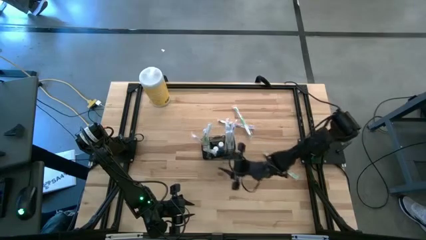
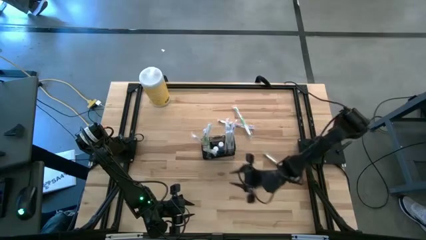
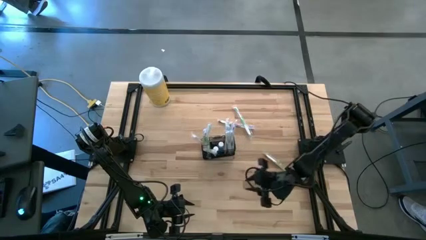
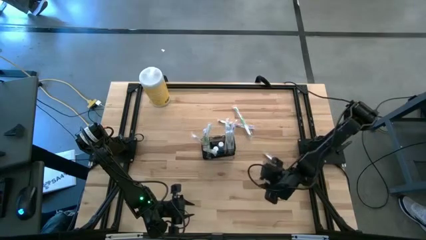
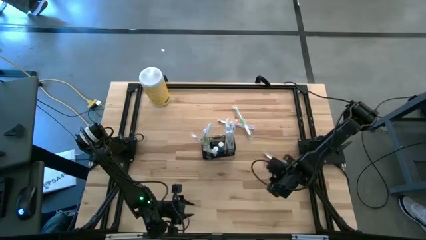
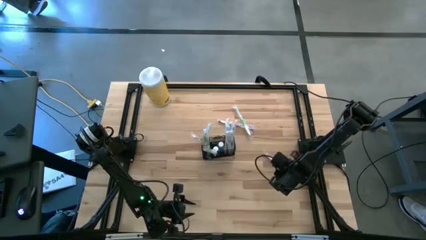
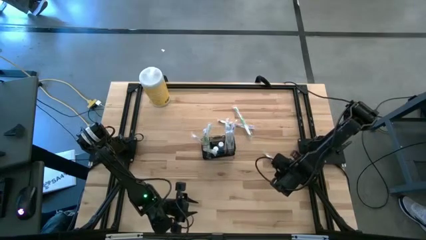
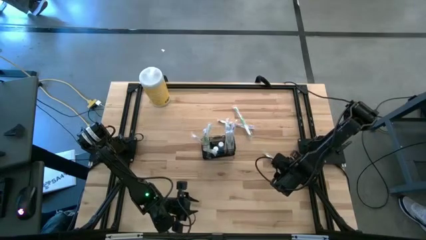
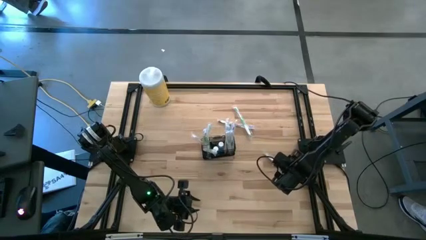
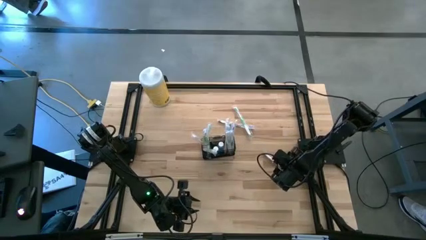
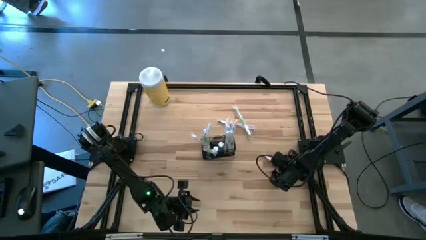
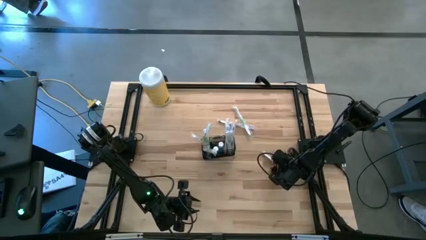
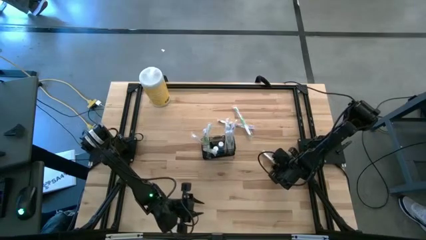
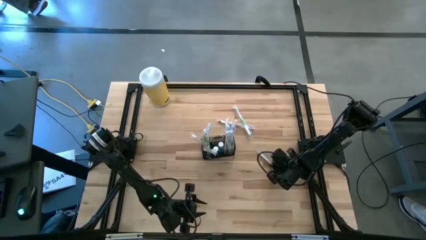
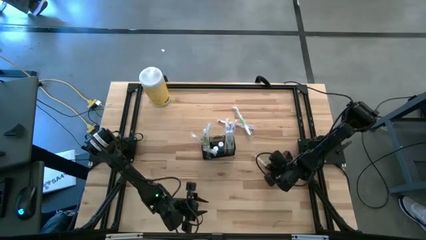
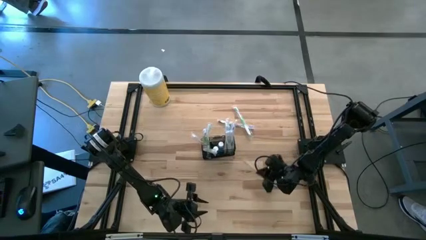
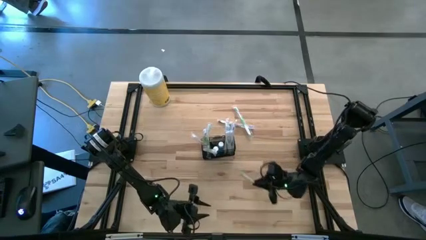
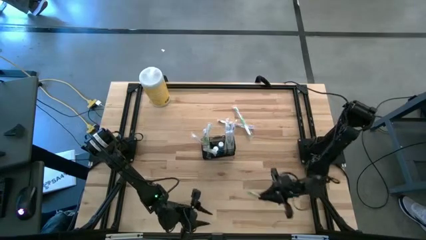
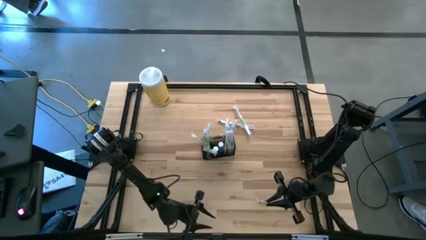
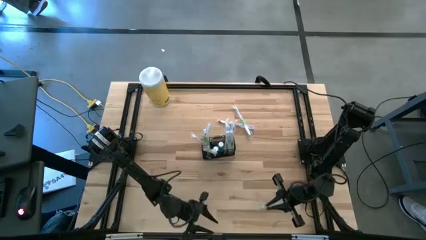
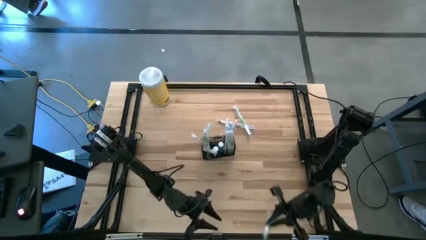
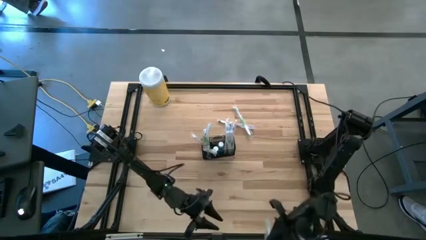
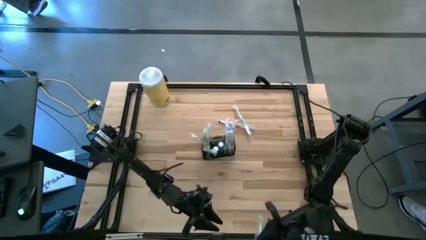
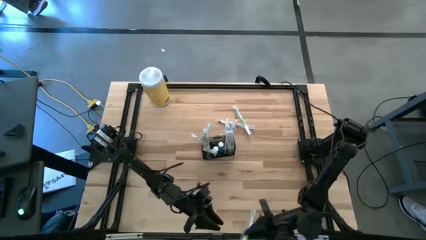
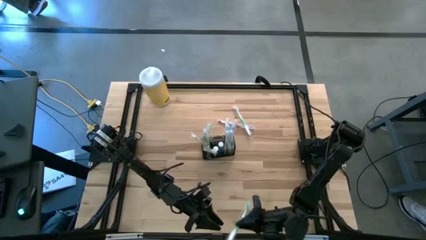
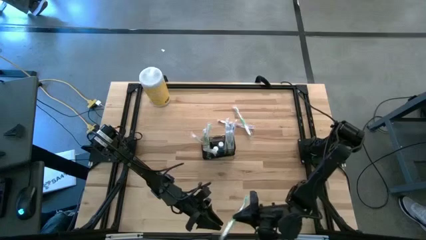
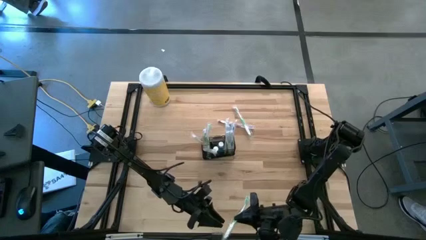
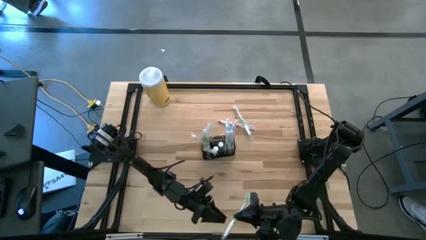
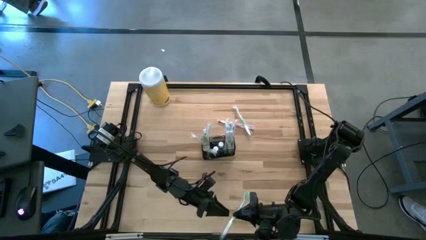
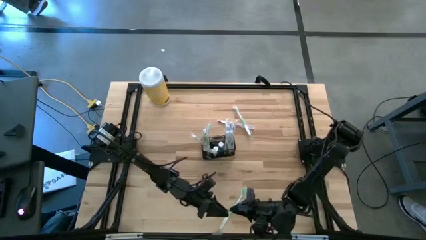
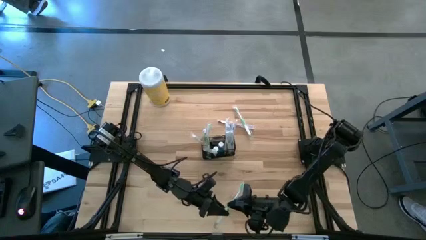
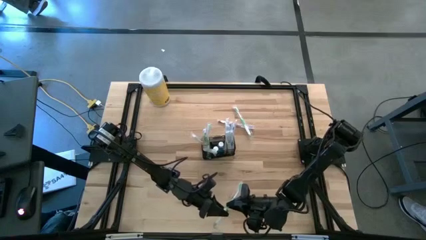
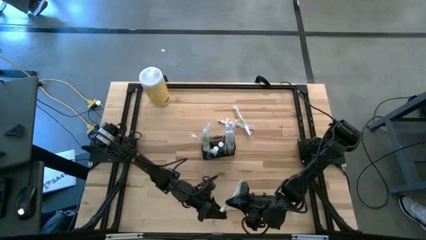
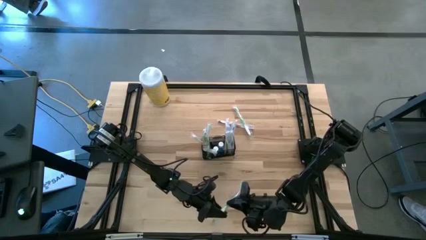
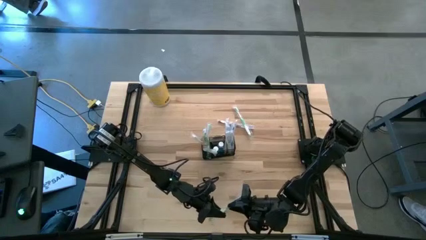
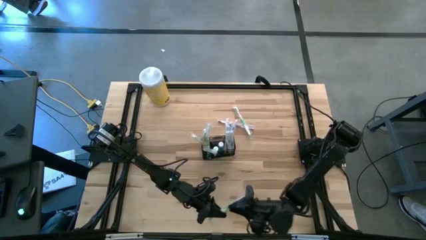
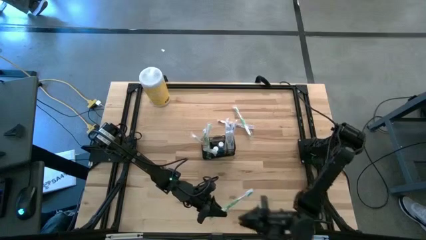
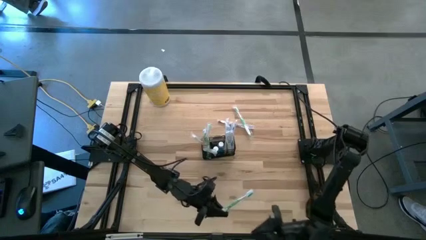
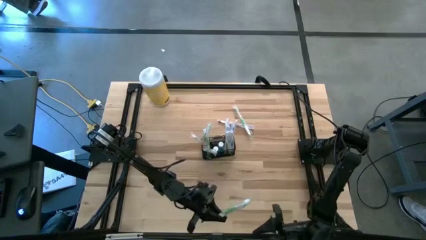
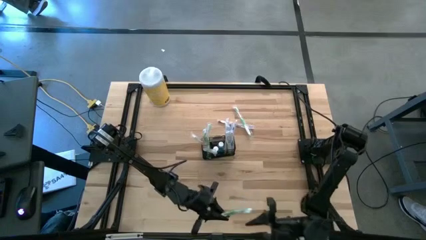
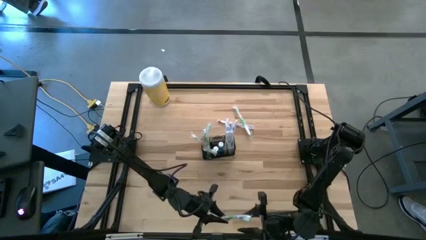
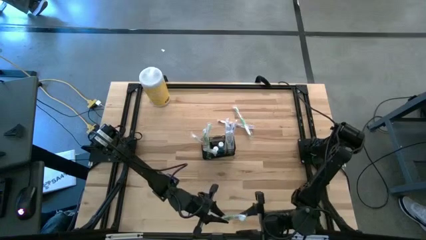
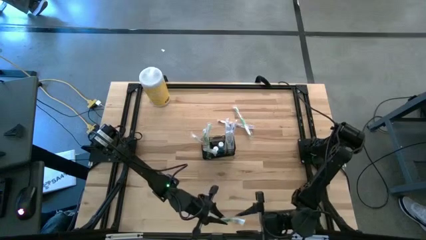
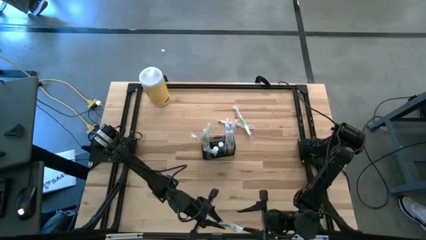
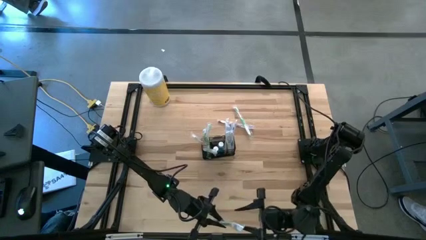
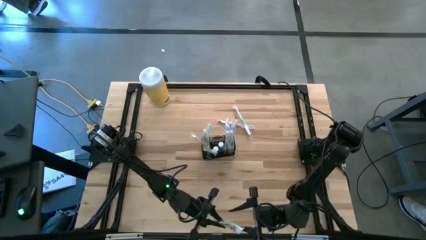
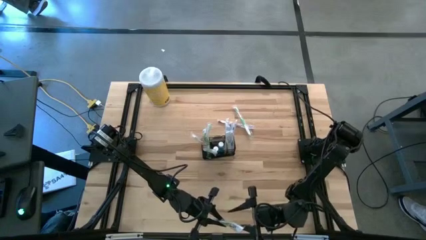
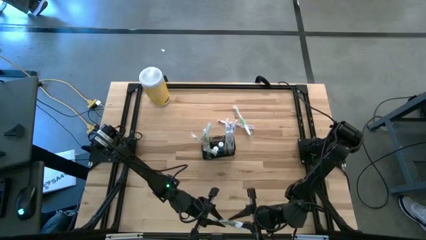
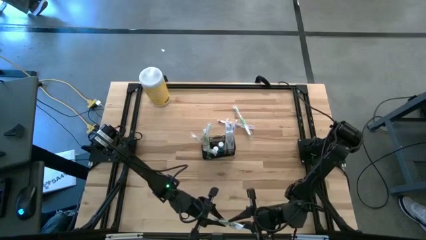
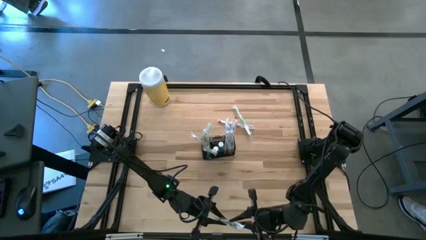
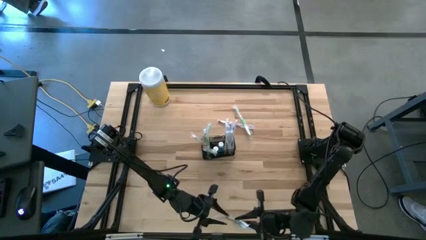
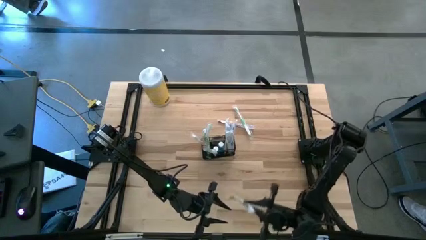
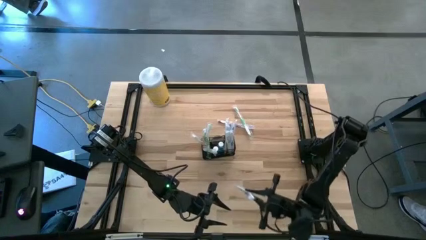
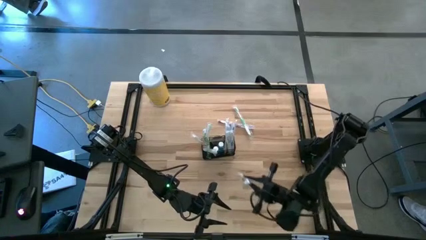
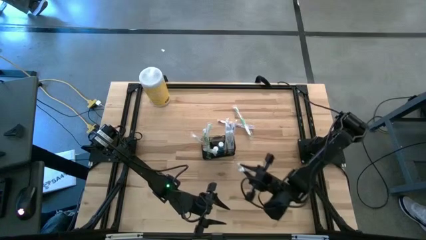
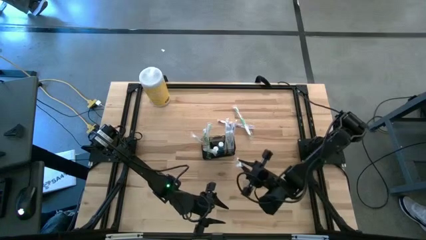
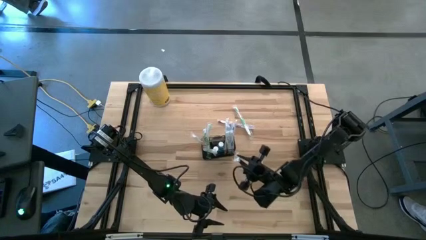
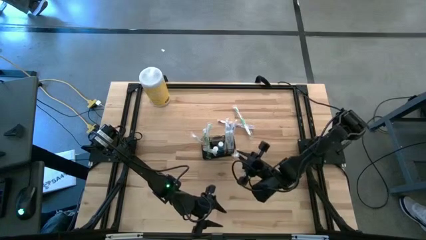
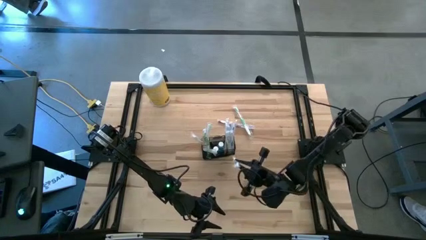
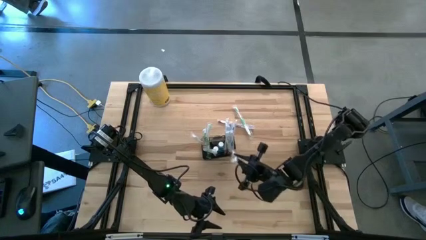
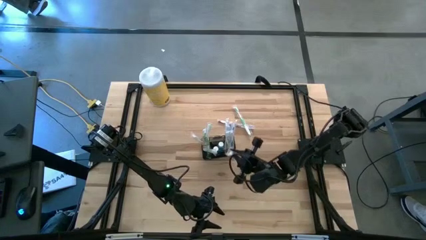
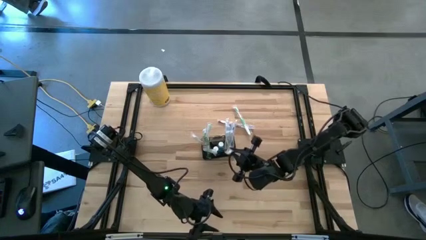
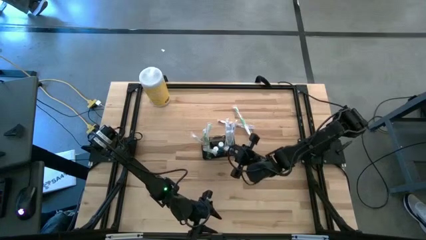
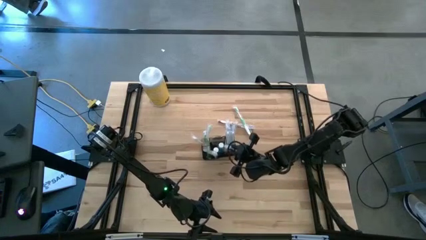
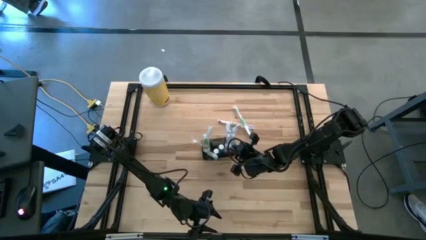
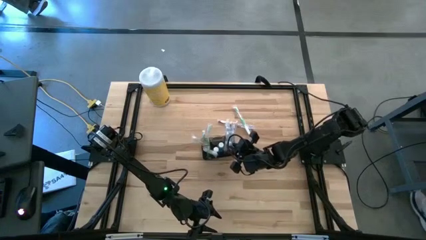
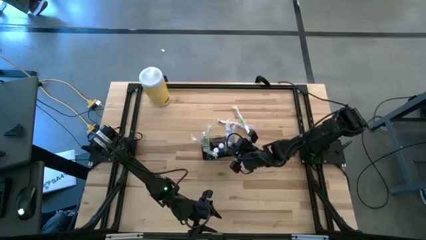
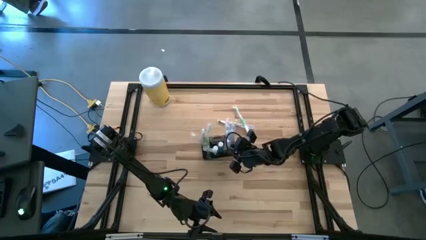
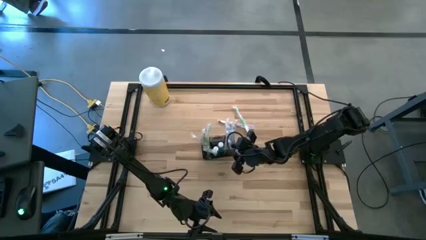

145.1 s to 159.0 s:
Task: Pick & Place toothbrushing station
Put the green toothbrush into the wire organizer

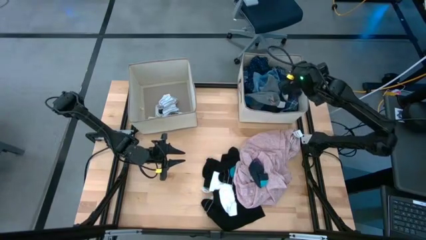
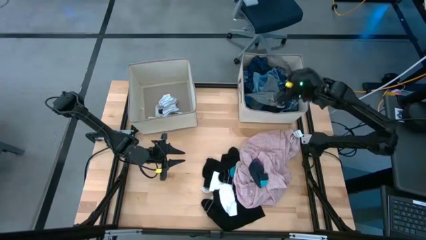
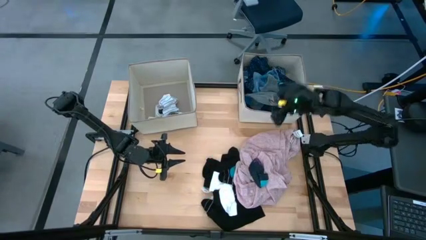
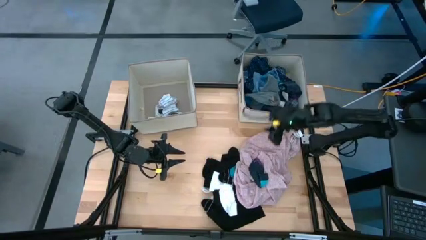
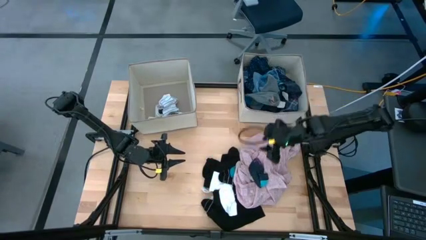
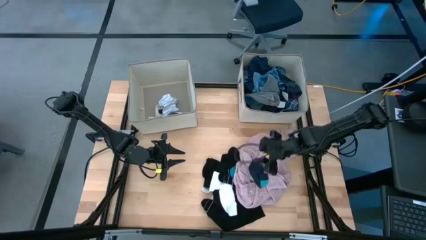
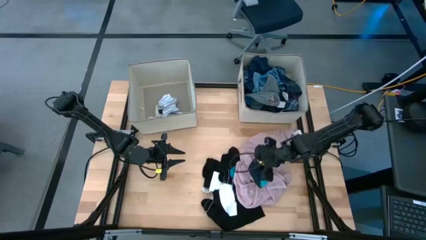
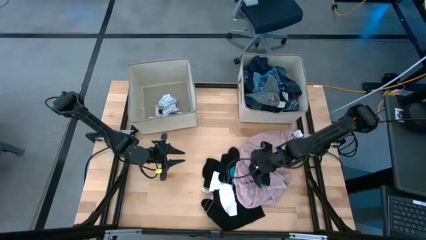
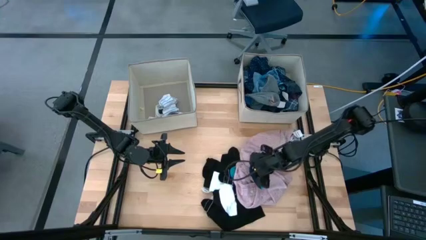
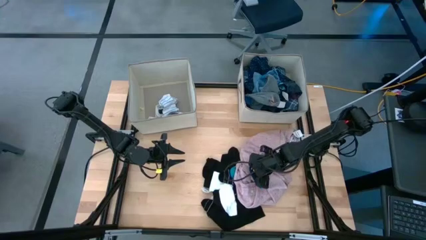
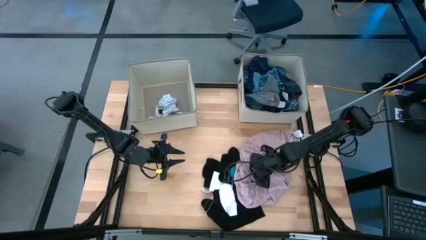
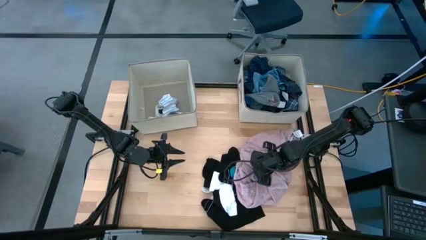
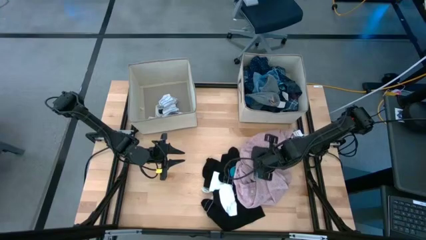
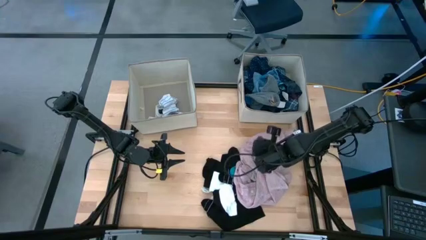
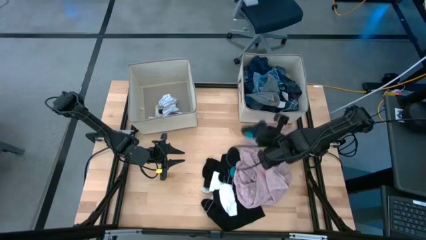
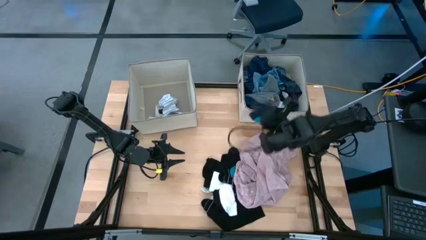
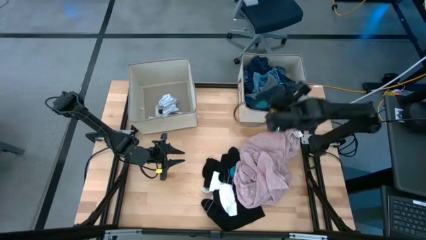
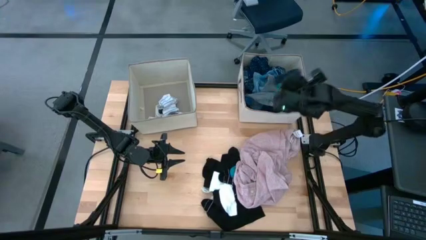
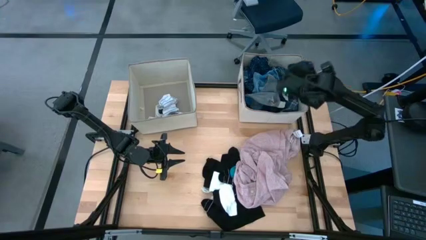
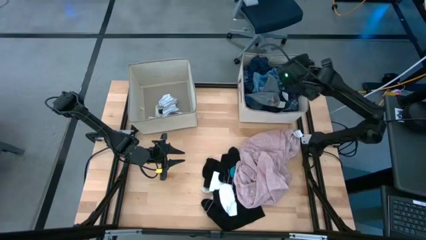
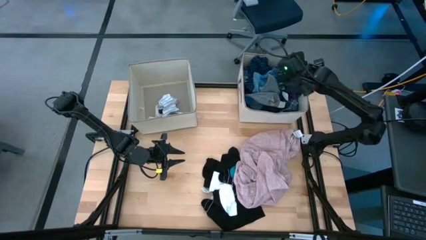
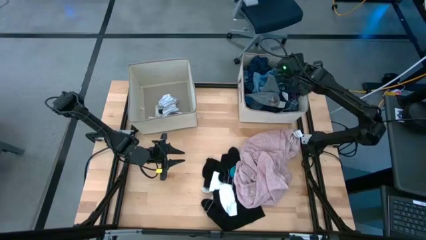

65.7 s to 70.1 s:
Task: Sort clothes
Put the dark blue sock into the right laundry bin
